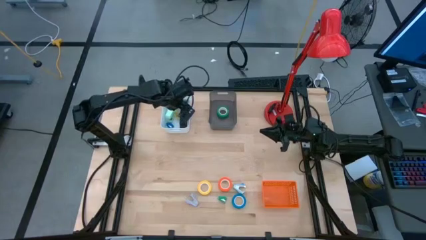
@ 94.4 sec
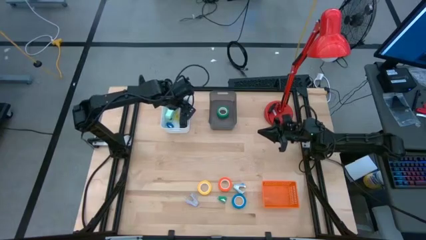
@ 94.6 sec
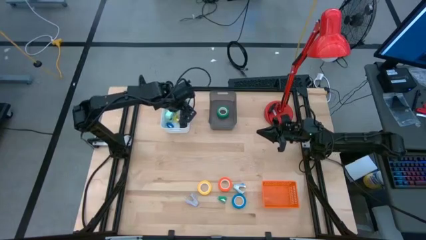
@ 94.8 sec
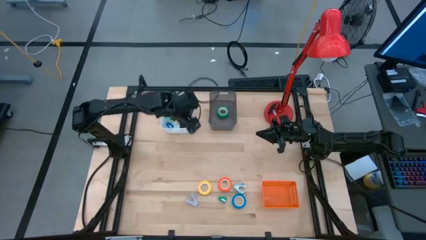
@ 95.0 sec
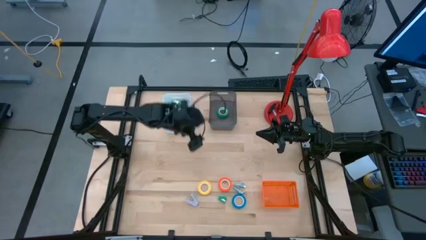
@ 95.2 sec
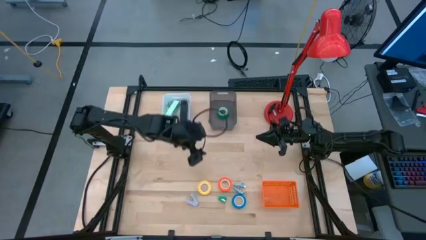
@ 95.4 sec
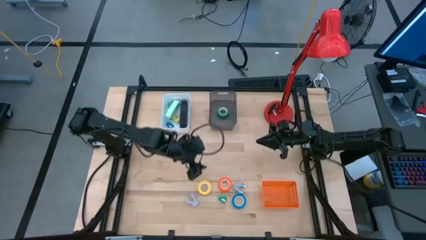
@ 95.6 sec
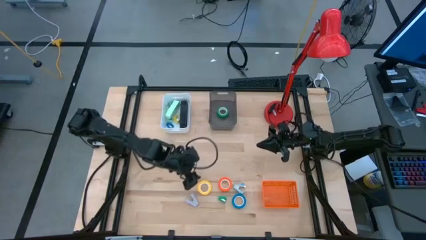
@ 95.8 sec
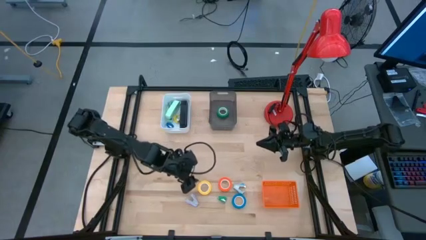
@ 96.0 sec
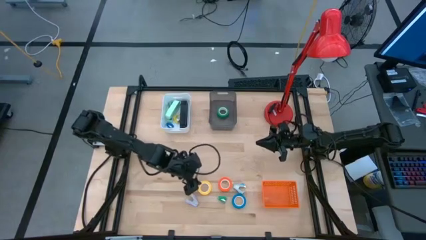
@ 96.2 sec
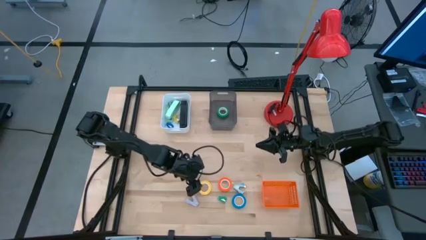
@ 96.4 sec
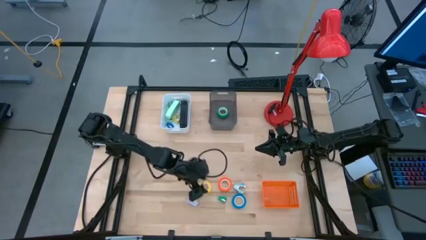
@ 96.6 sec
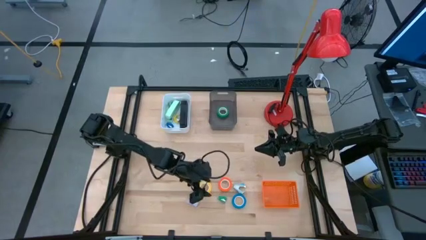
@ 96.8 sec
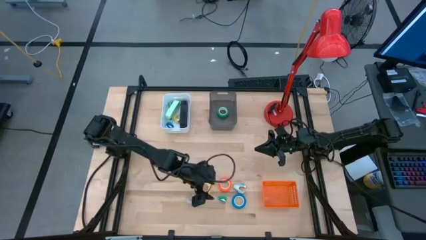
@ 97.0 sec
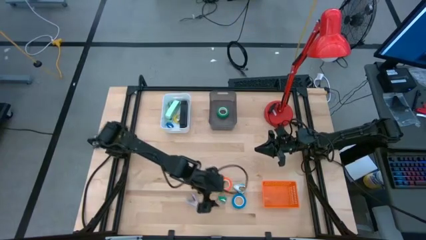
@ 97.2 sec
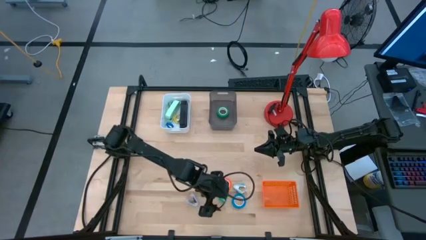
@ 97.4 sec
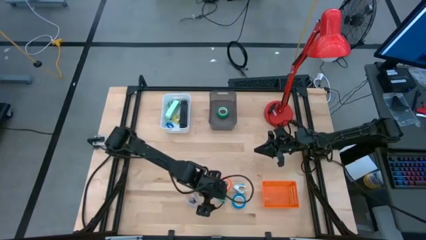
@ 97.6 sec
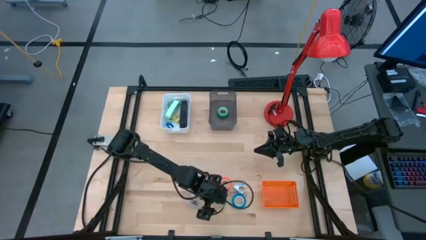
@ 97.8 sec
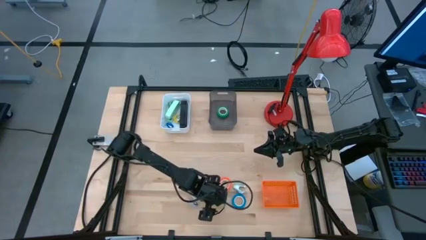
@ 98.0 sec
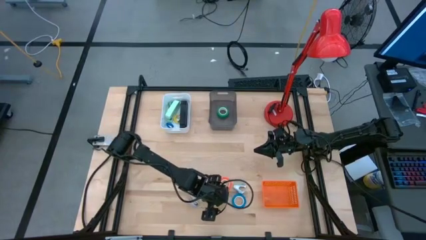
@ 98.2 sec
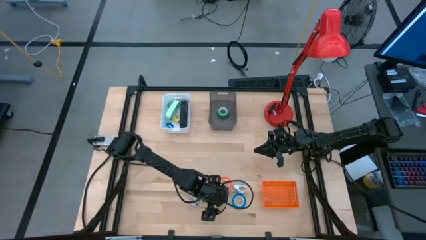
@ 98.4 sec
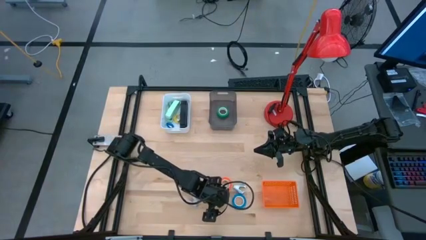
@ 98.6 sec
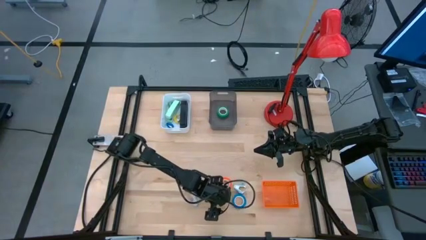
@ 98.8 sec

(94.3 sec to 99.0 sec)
Task: Pick and place Stapler, Stapler remover, tape
Put the small green stapler into the white bin

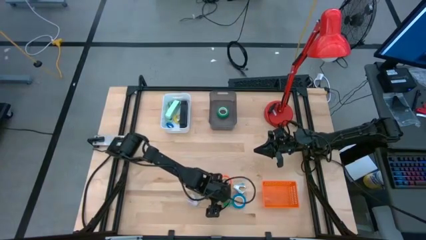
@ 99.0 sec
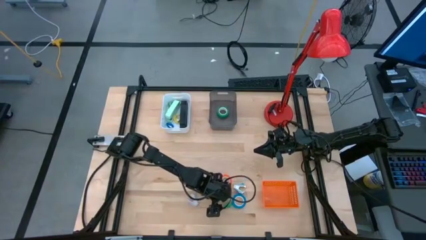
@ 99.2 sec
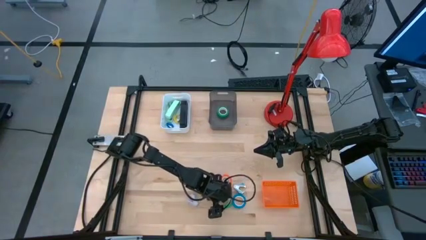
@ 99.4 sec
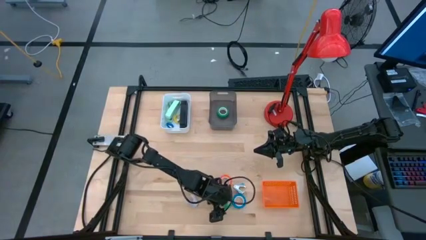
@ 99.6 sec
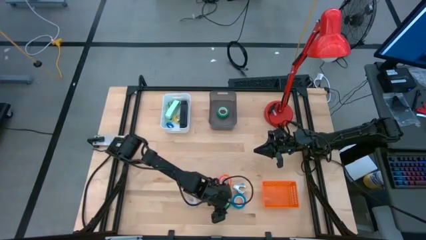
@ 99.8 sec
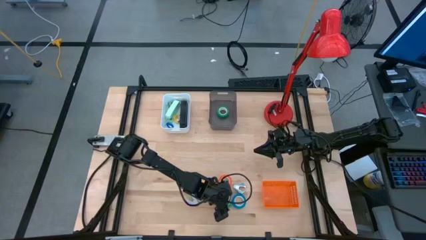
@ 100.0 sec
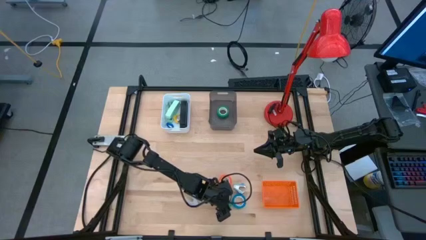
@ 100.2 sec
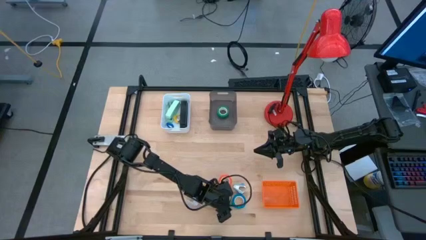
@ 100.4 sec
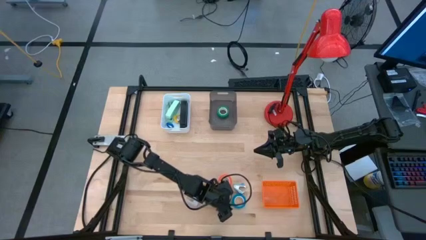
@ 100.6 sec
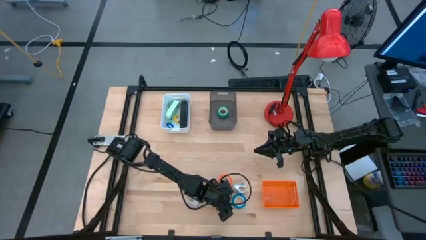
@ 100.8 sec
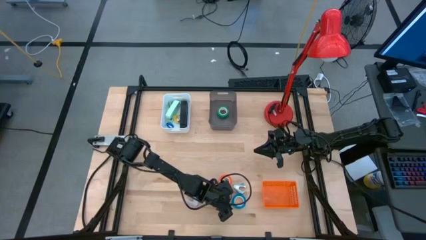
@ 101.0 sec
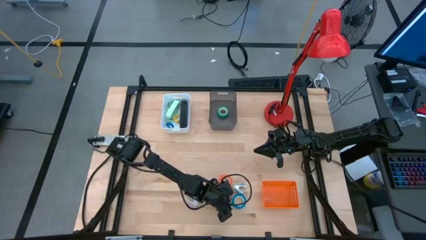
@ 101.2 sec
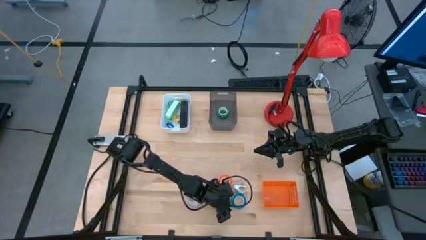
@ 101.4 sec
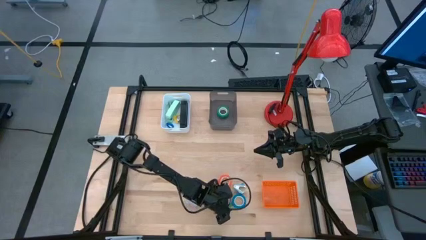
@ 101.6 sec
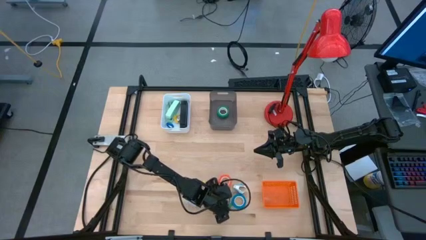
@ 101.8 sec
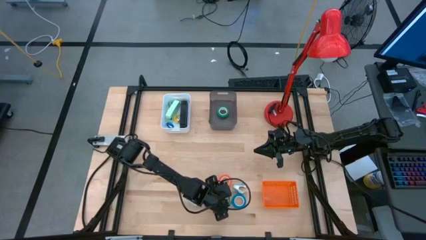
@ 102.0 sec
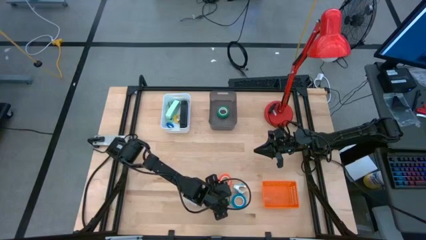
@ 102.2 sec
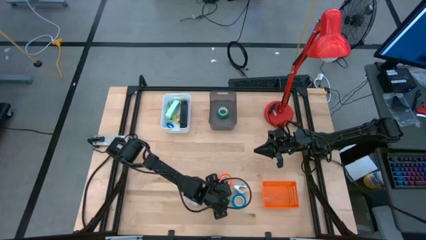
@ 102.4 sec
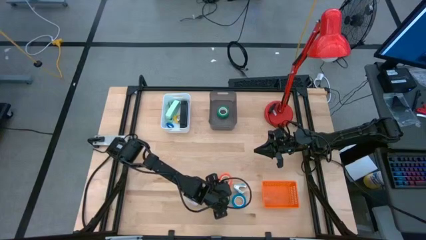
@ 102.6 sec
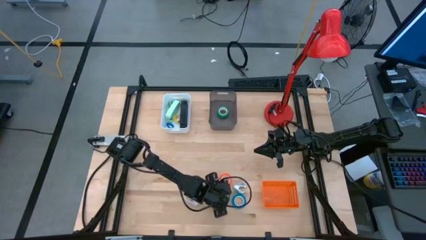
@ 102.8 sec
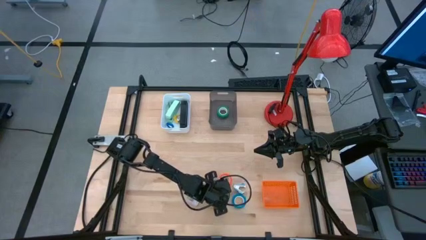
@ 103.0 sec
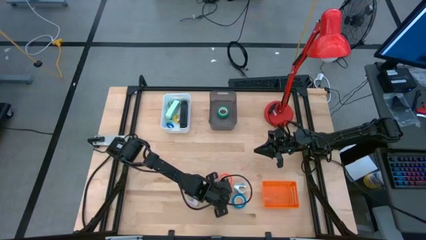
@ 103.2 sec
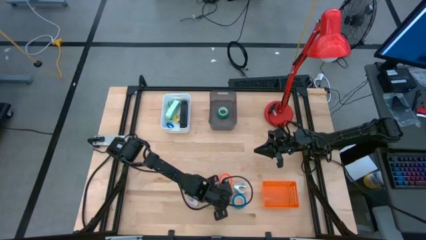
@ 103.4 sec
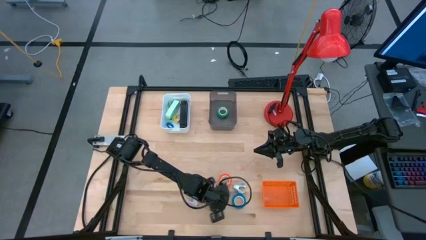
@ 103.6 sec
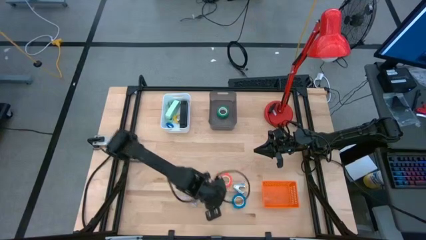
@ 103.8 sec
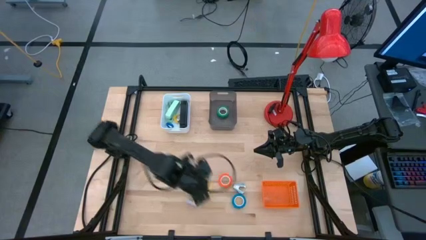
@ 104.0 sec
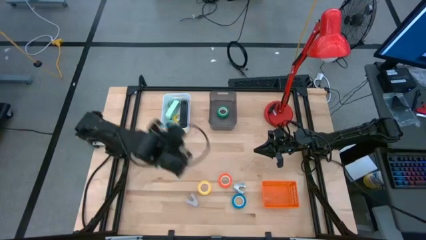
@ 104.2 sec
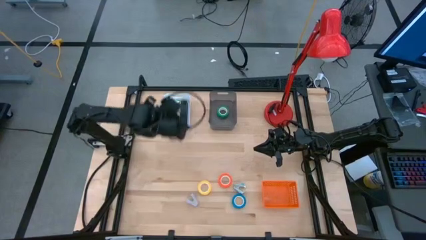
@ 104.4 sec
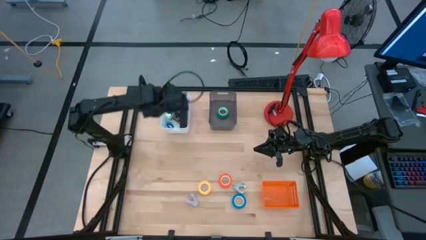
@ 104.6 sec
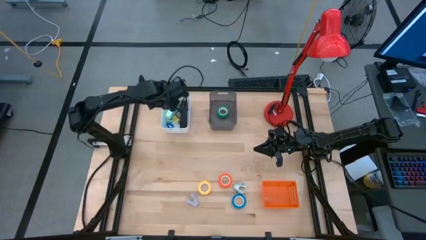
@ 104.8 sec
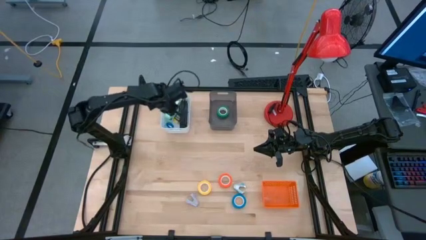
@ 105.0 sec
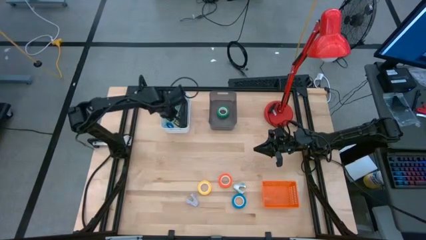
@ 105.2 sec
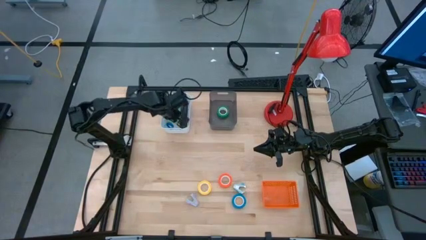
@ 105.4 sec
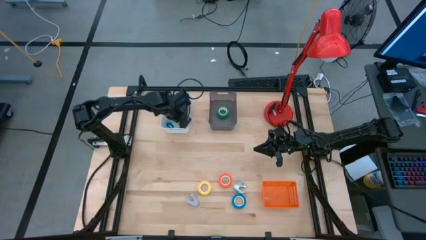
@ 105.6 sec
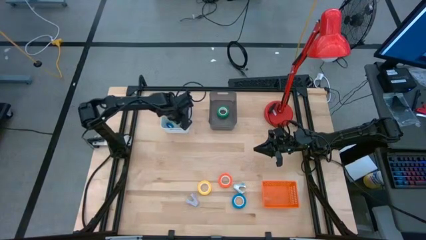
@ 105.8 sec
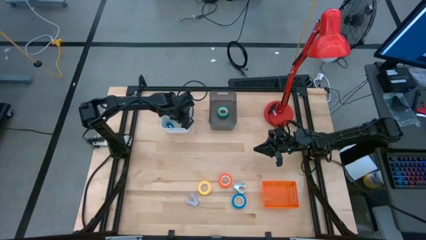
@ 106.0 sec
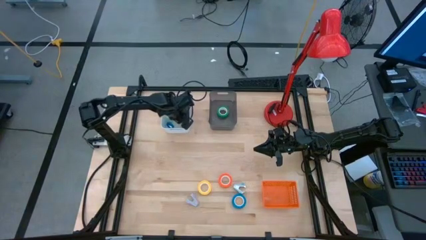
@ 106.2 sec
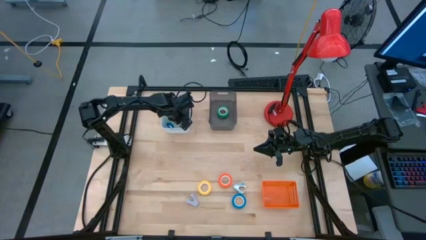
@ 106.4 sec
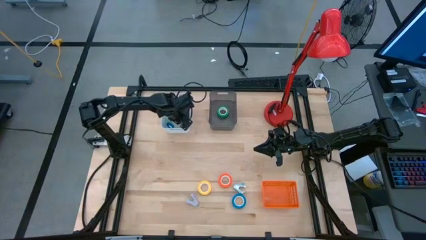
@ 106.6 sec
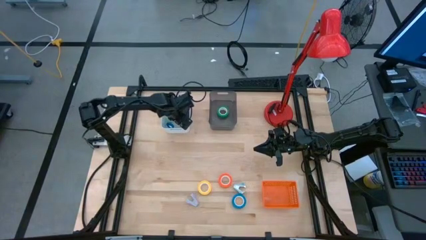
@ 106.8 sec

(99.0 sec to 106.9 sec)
Put the small green stapler into the white bin

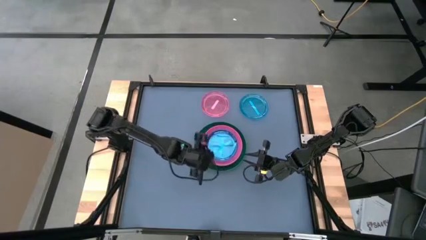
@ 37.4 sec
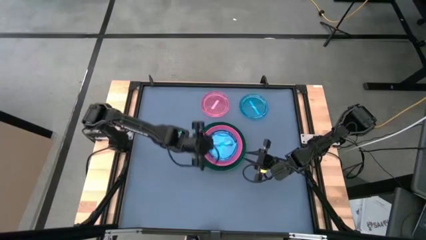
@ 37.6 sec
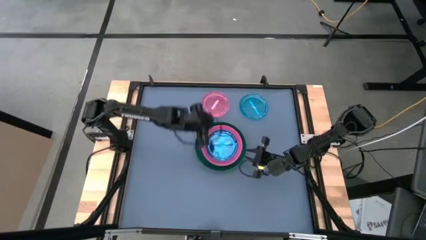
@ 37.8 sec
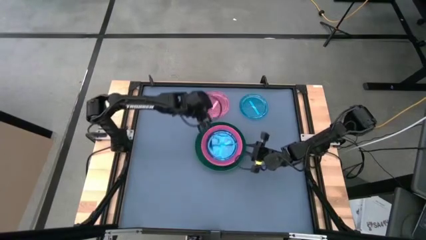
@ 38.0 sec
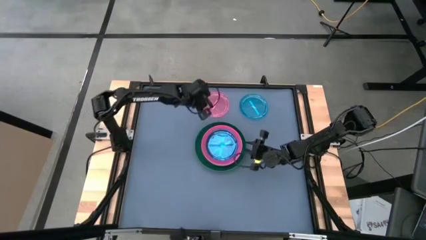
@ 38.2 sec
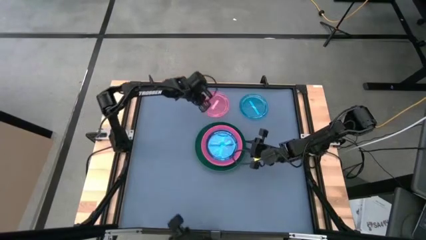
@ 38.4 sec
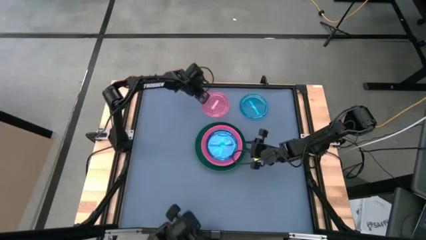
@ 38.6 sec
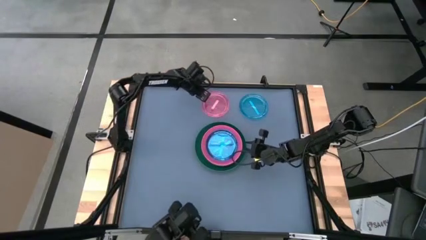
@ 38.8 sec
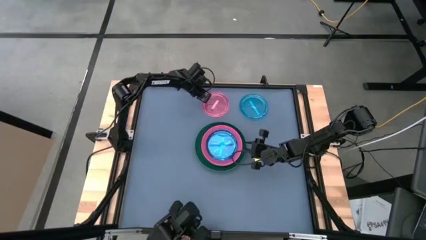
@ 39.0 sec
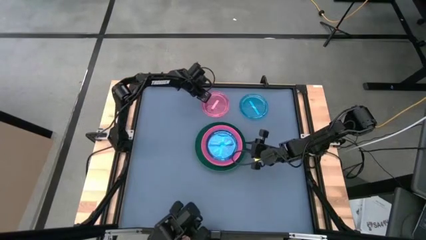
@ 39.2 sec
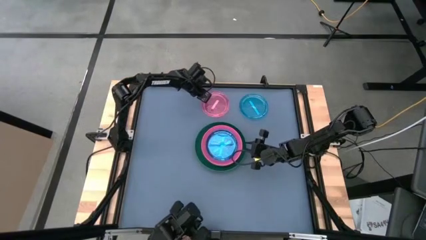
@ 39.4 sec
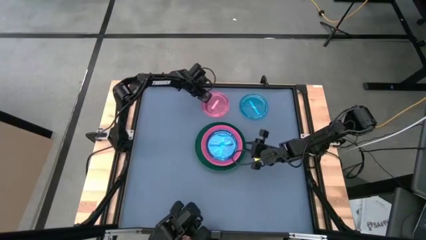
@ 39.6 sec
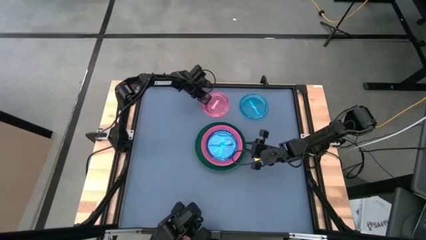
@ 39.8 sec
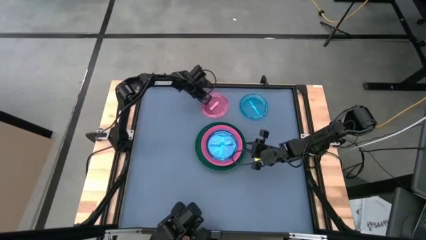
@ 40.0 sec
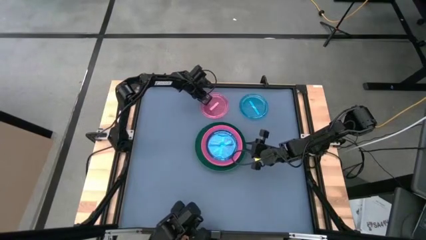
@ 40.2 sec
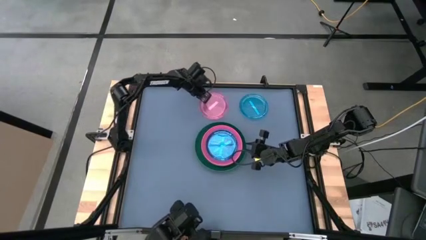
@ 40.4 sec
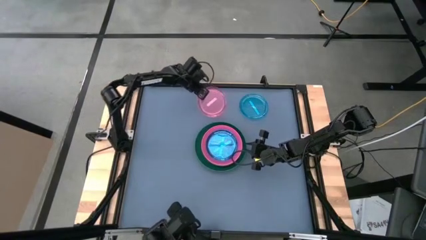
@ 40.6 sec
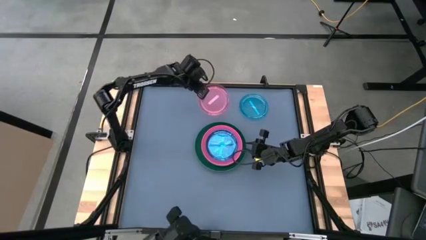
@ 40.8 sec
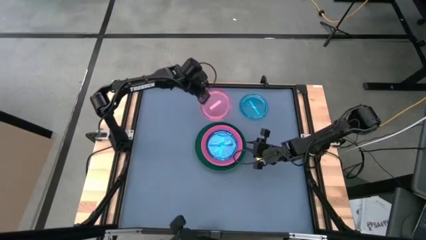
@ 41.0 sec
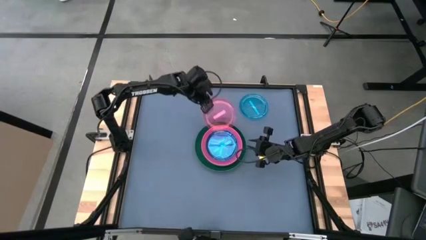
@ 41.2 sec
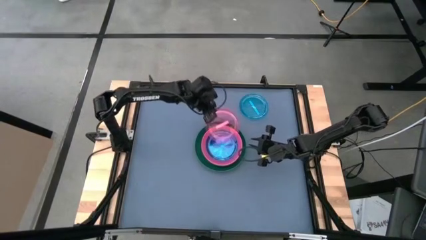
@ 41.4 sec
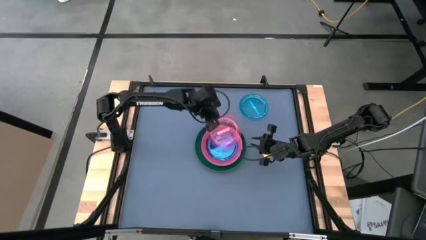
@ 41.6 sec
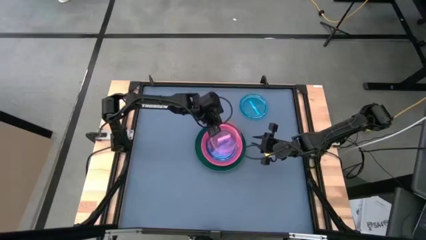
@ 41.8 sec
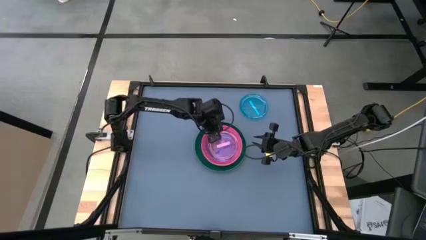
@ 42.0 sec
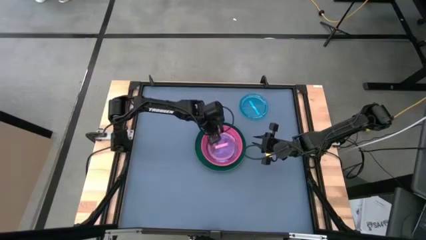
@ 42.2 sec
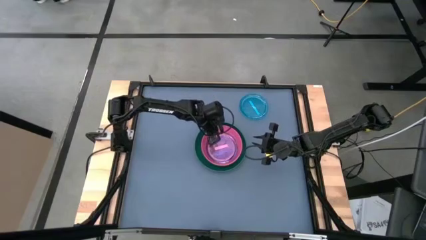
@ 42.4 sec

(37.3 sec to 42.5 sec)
Task: Stack plastic plates
Stack the light pink plate on the blue plate
